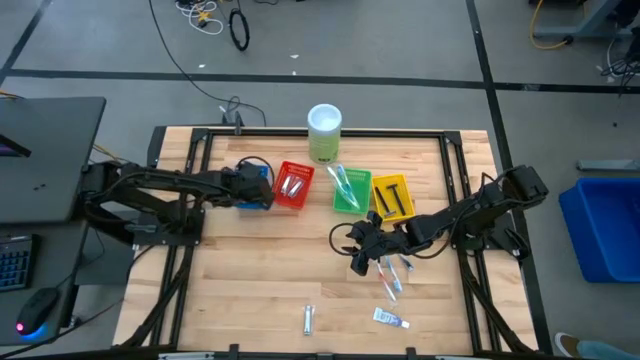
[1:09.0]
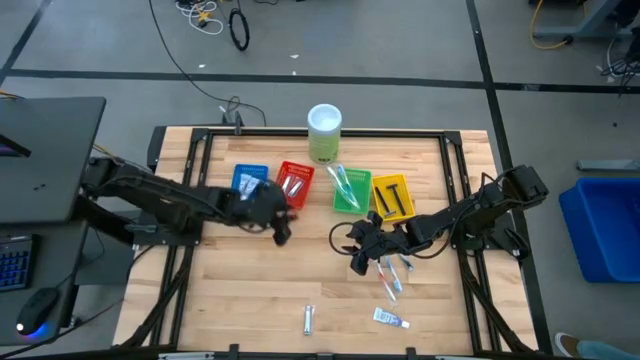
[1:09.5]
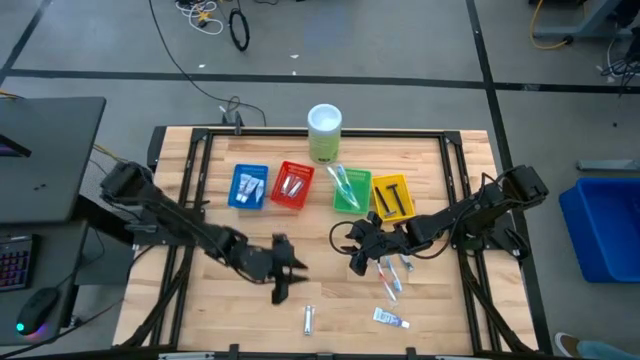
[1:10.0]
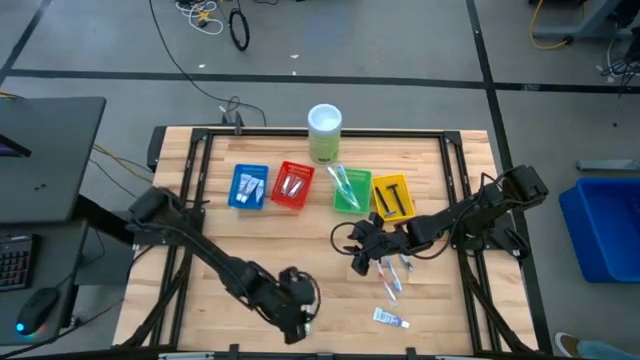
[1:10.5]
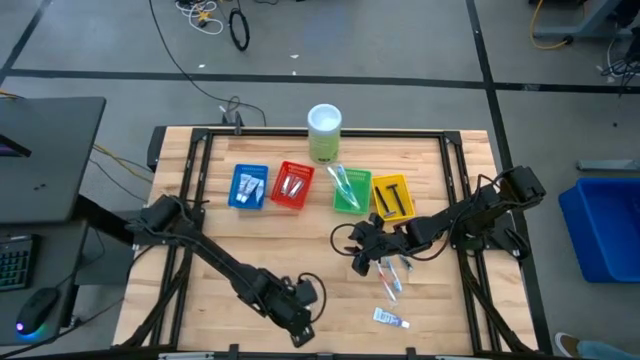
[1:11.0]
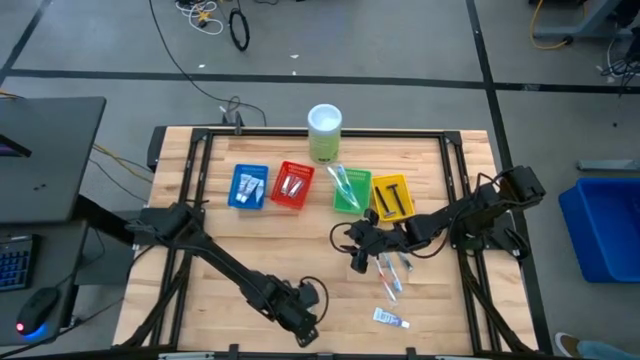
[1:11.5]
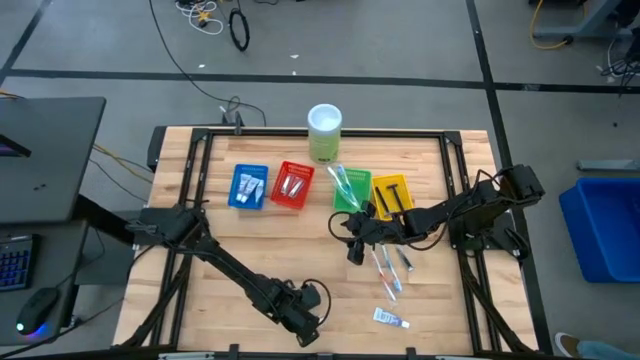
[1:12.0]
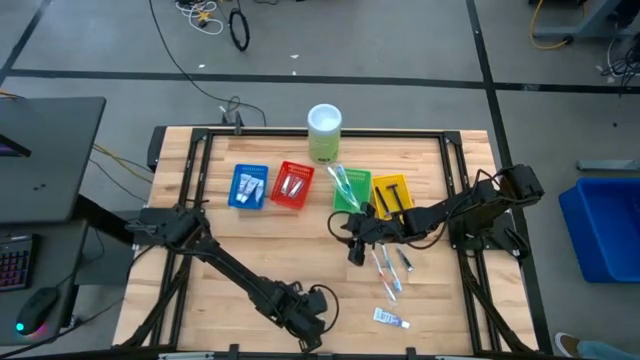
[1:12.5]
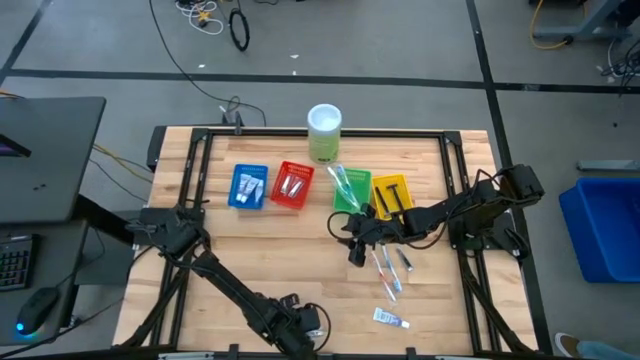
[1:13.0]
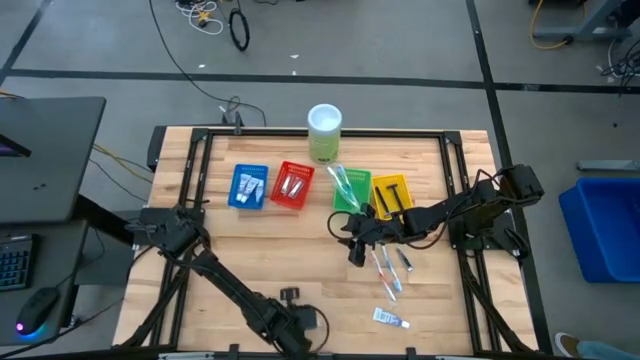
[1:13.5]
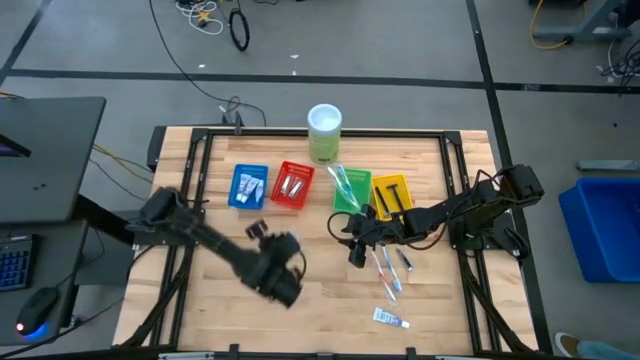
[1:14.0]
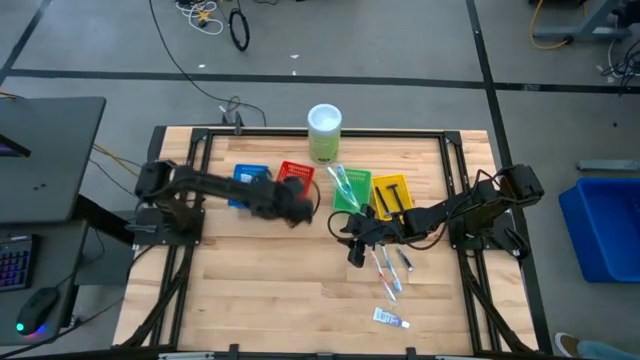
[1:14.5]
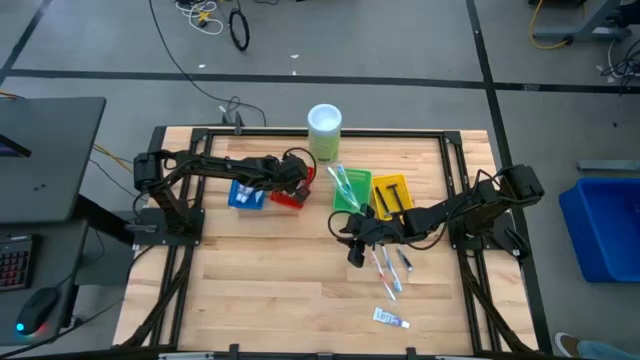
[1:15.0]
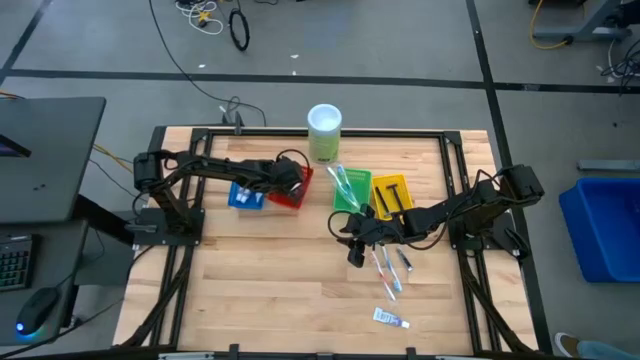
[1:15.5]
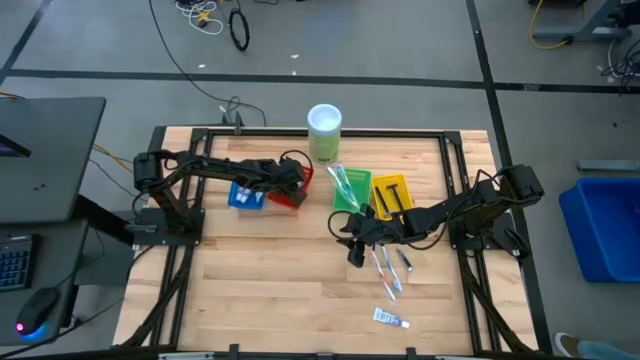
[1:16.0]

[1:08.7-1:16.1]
Task: Pick & Place Travel size toiletries
Put the silver nail cutter into the red basket

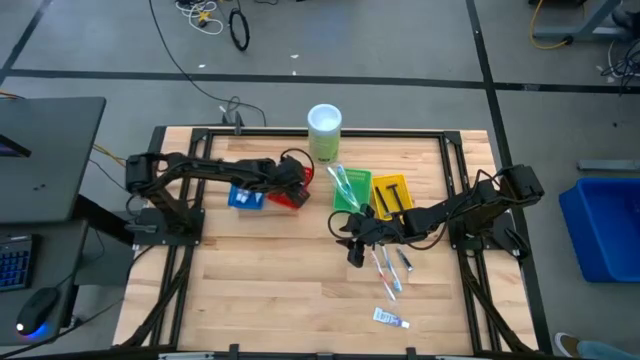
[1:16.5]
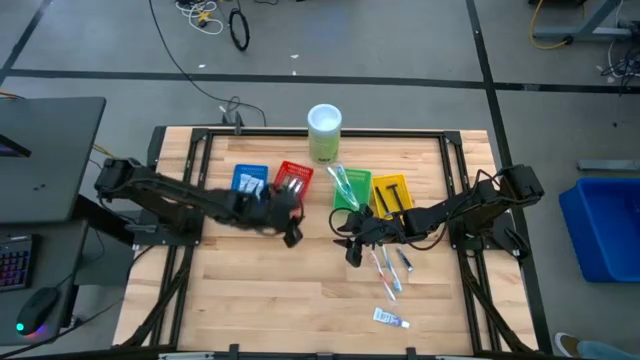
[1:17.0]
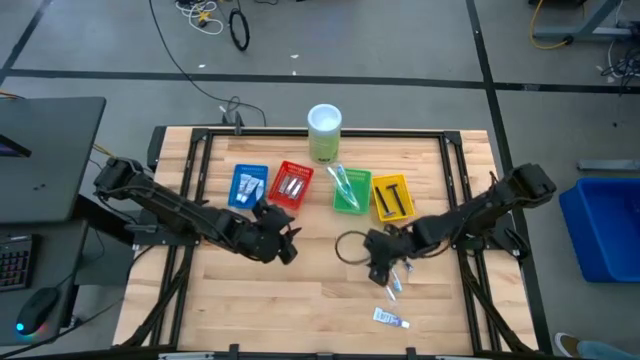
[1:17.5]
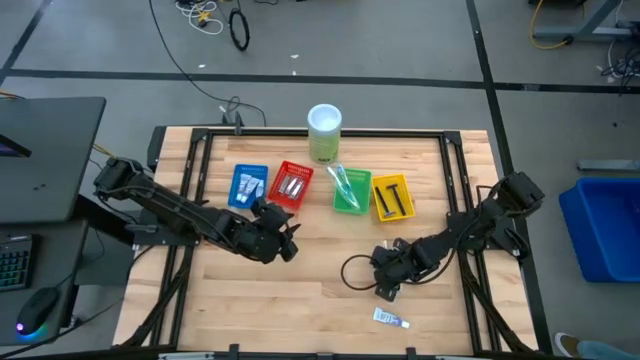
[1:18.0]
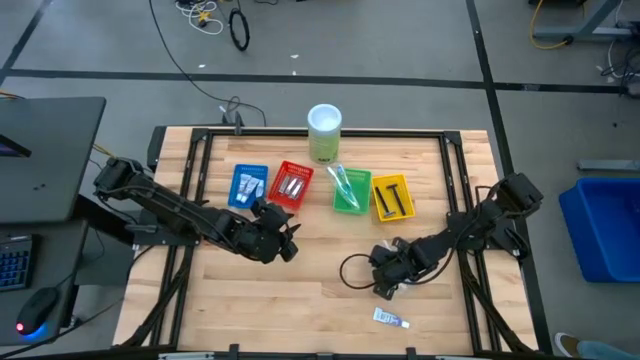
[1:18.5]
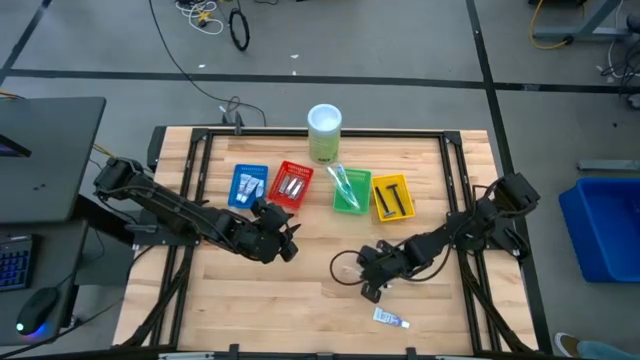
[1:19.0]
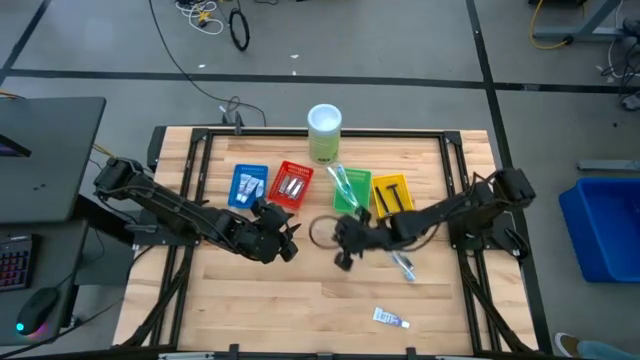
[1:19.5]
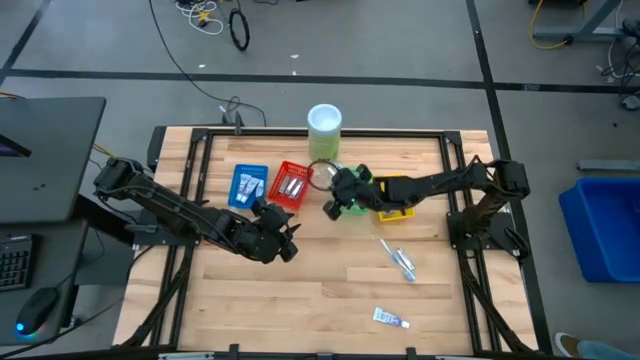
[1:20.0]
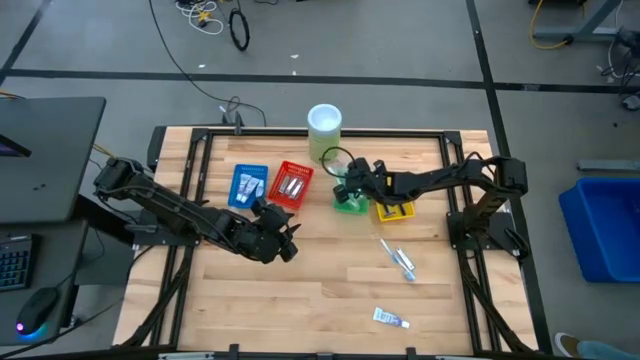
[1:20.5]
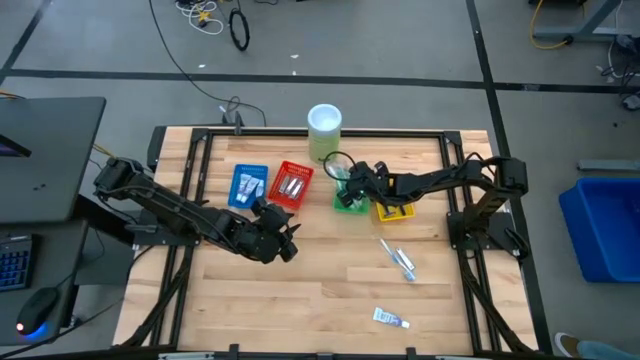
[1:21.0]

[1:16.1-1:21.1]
Put the orange toothbrush into the green basket

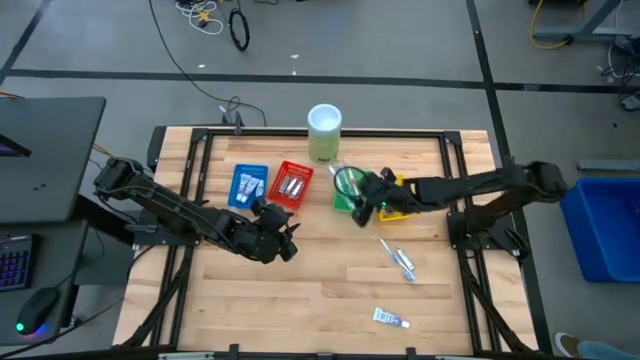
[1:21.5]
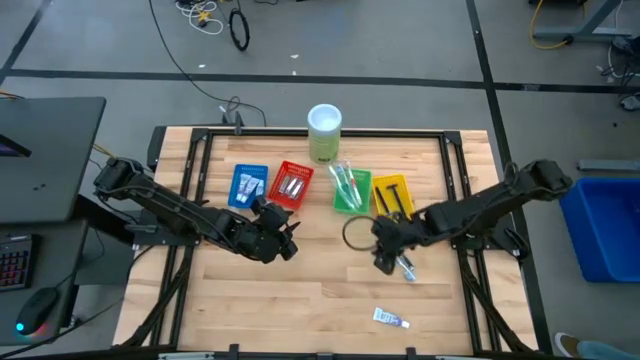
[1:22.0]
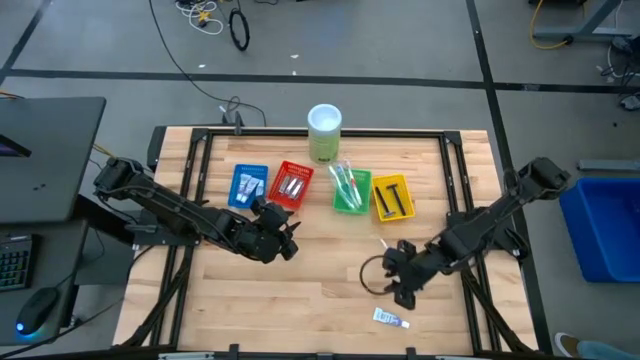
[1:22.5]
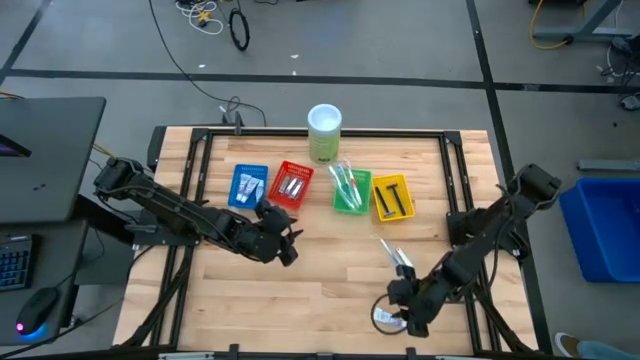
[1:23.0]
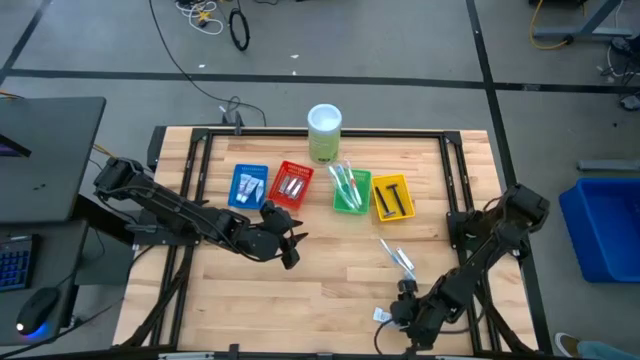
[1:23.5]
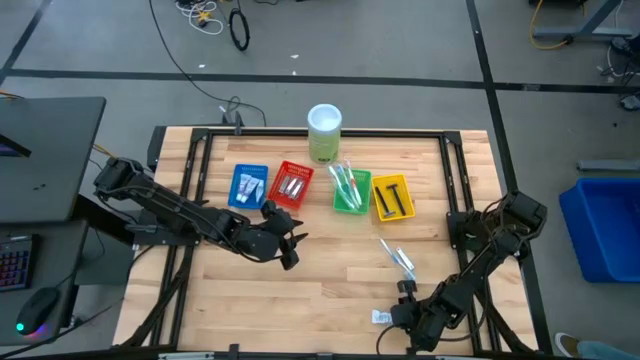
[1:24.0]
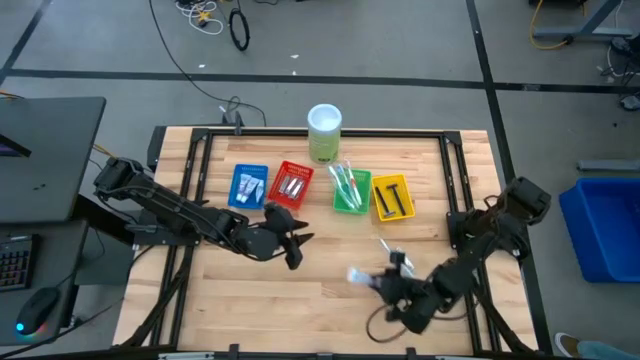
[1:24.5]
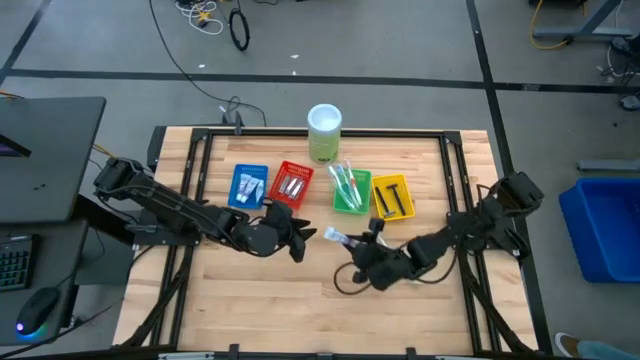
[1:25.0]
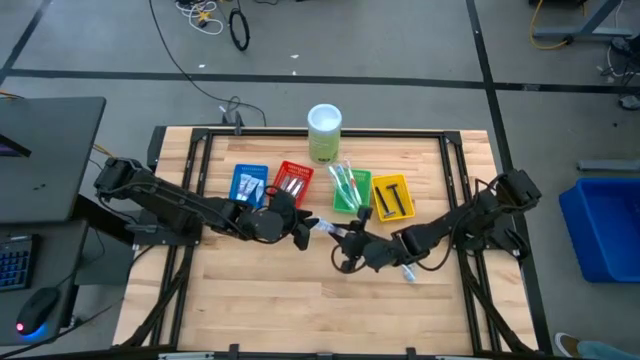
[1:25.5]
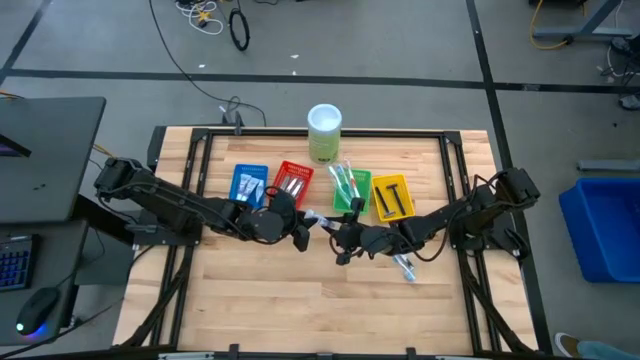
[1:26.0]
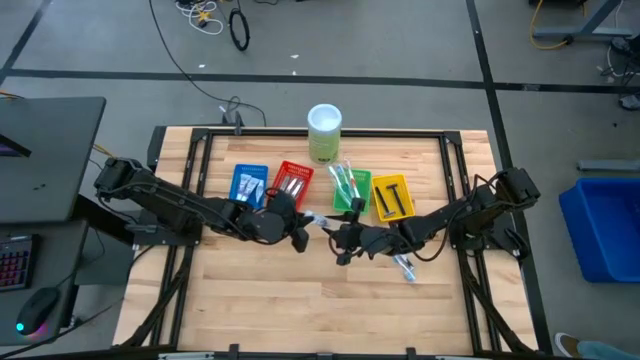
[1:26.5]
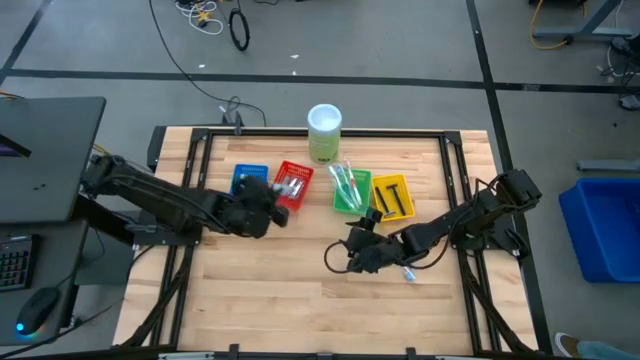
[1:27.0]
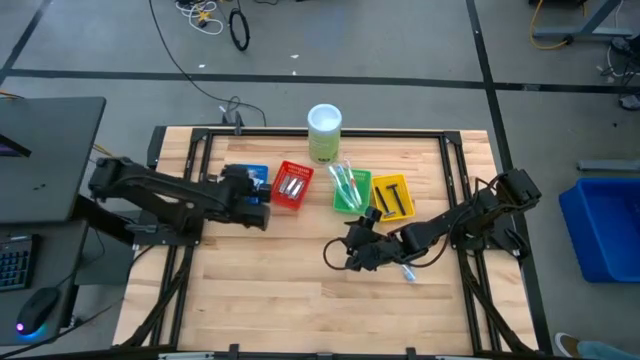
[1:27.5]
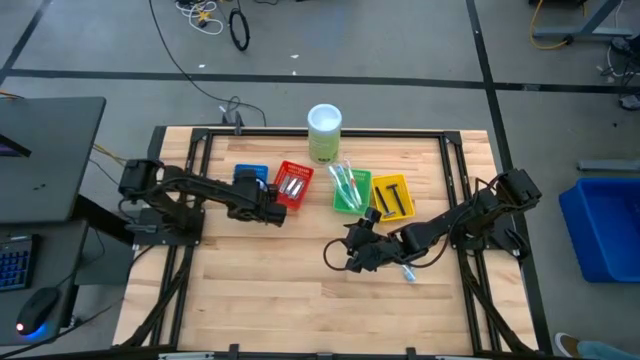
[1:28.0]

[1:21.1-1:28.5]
Put the white toothpaste into the blue basket

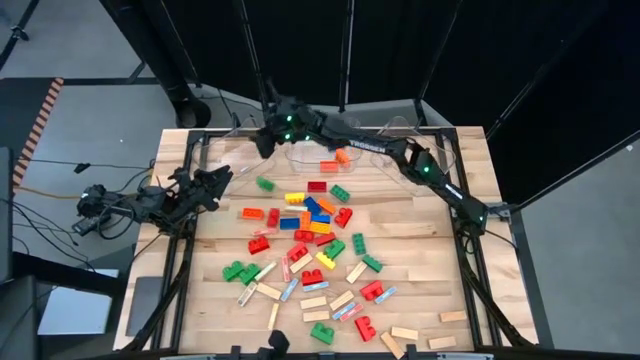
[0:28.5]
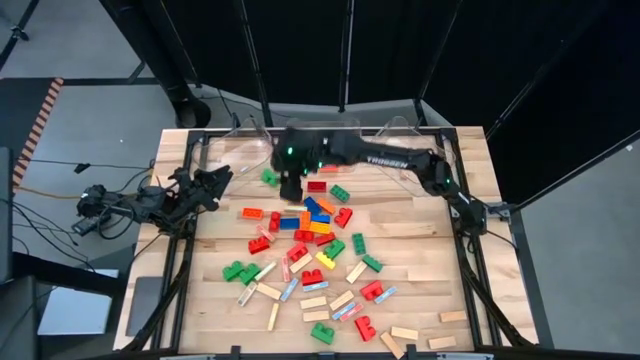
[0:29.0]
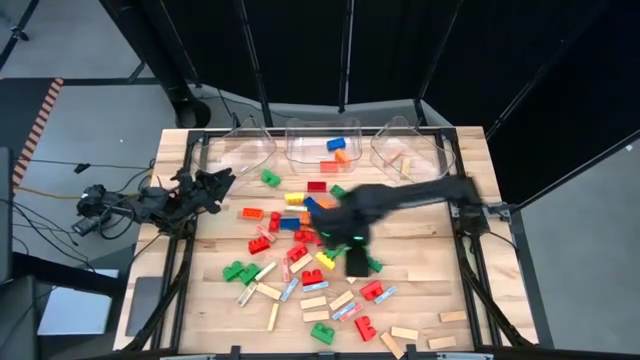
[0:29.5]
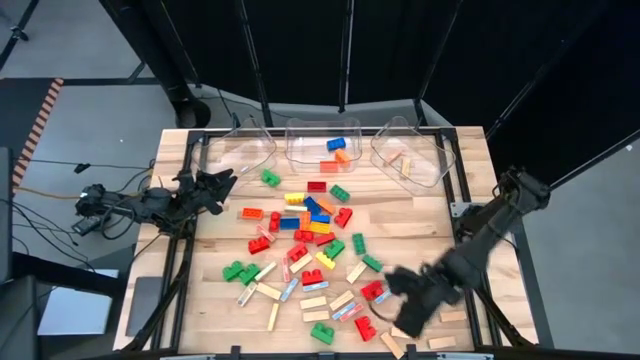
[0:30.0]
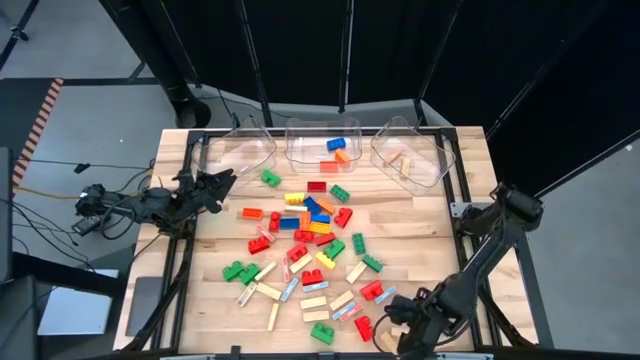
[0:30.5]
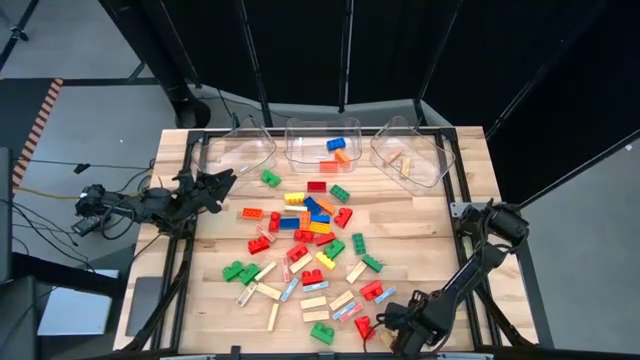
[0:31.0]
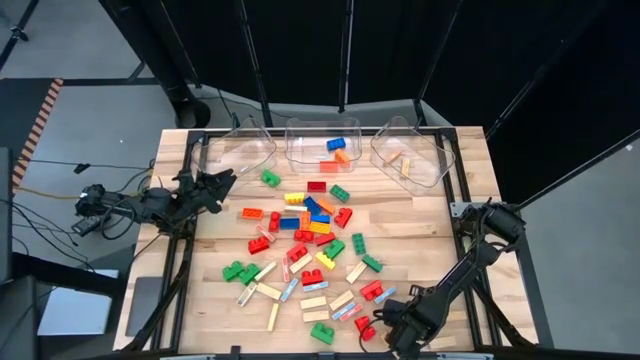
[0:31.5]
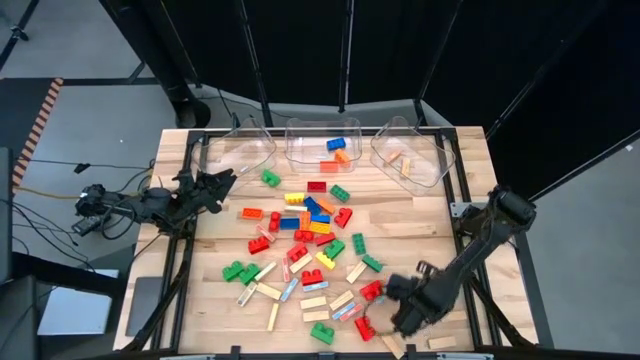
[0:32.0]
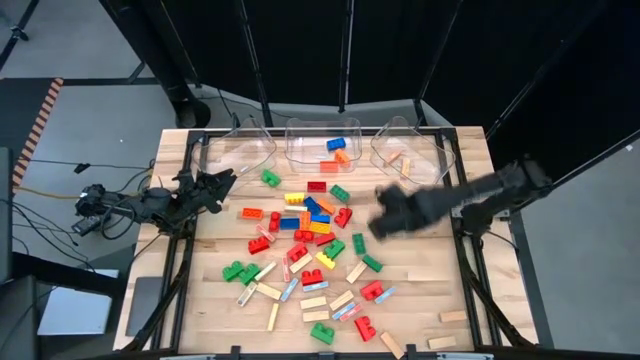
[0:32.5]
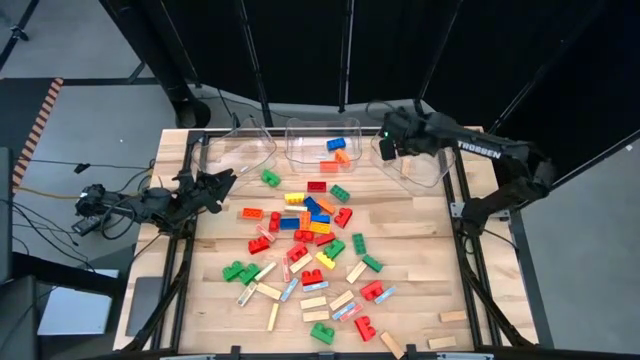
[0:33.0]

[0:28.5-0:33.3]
Task: Sort blocks by size
Put the brown wooden block into the right transparent bin
